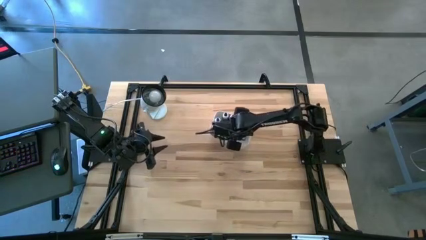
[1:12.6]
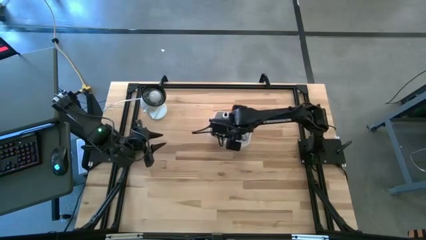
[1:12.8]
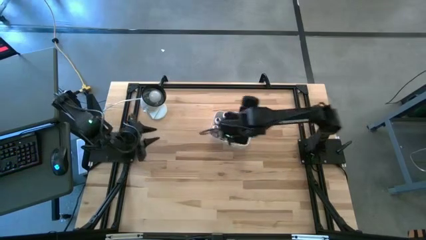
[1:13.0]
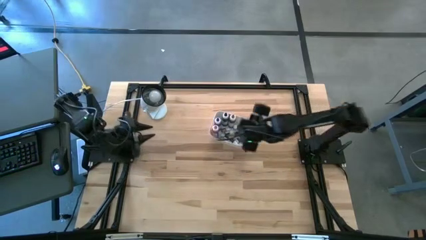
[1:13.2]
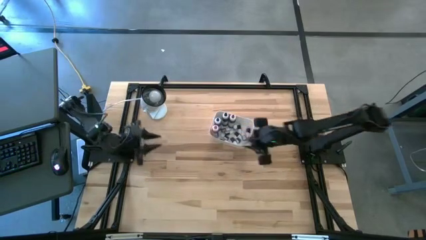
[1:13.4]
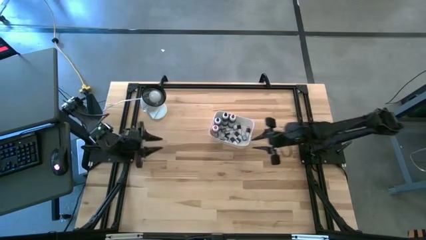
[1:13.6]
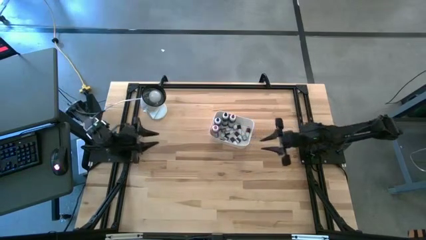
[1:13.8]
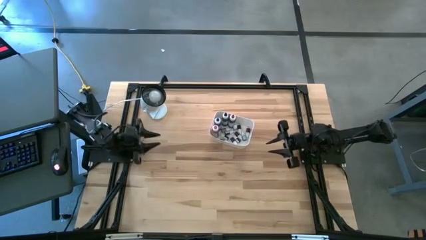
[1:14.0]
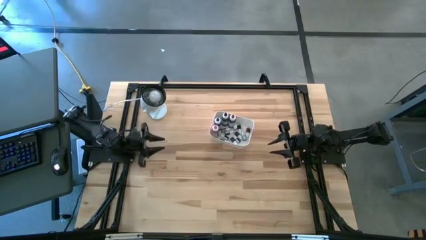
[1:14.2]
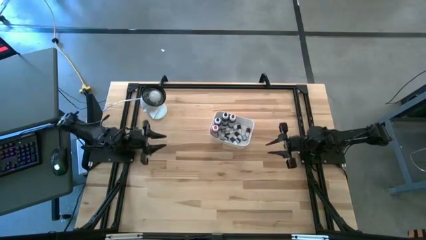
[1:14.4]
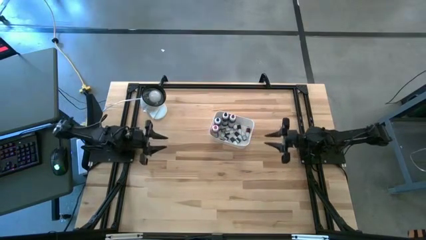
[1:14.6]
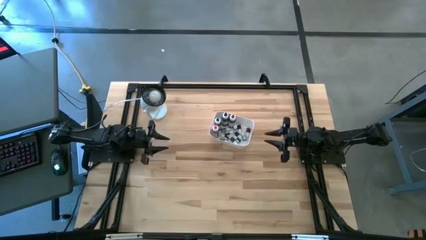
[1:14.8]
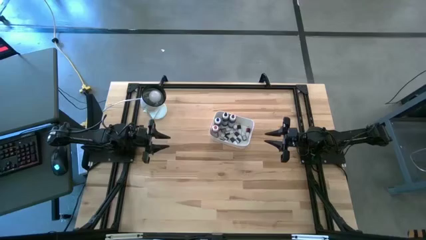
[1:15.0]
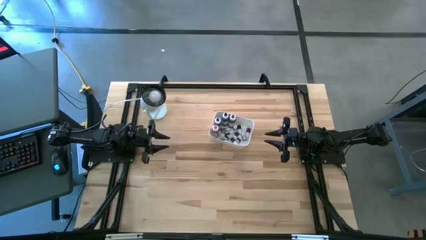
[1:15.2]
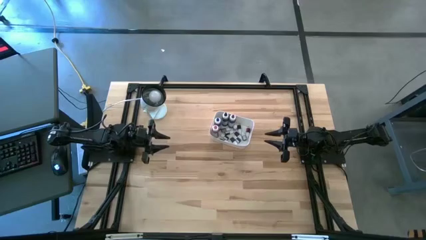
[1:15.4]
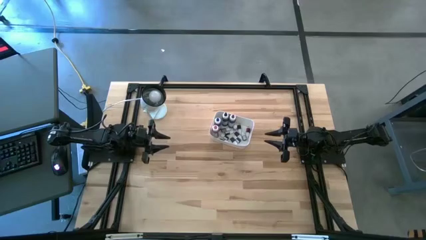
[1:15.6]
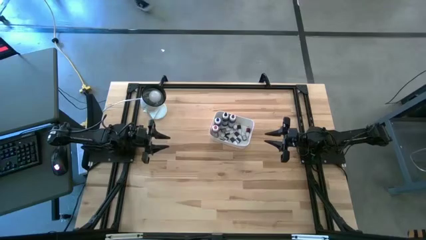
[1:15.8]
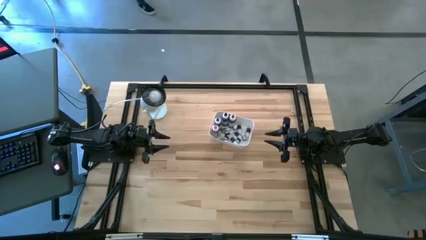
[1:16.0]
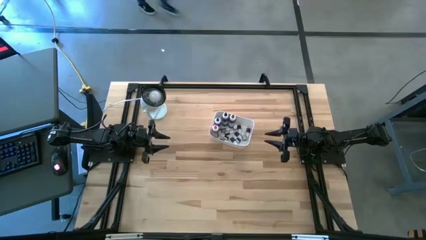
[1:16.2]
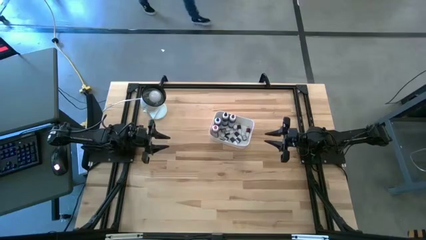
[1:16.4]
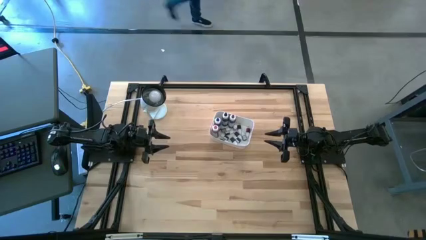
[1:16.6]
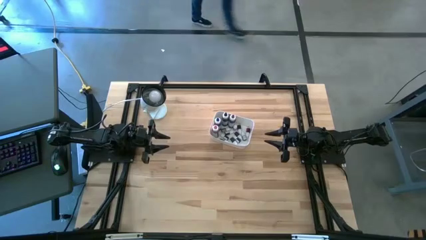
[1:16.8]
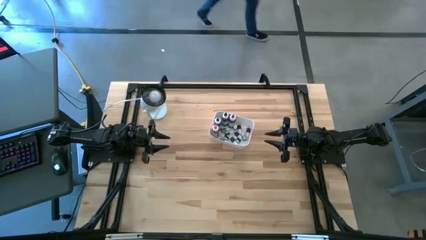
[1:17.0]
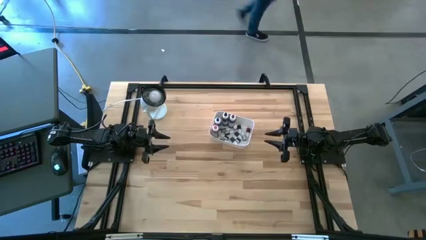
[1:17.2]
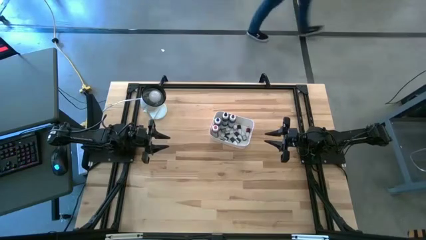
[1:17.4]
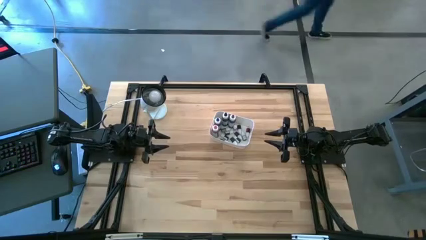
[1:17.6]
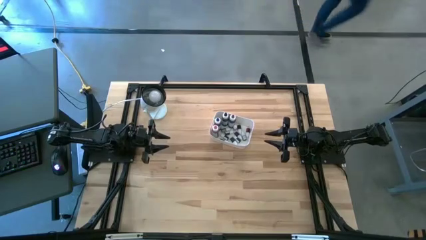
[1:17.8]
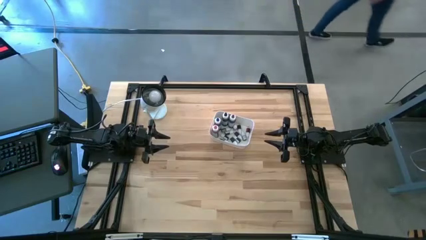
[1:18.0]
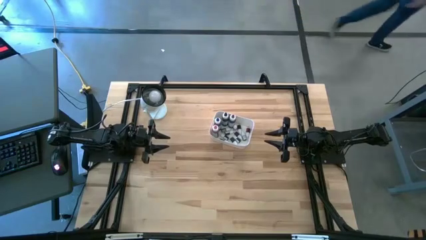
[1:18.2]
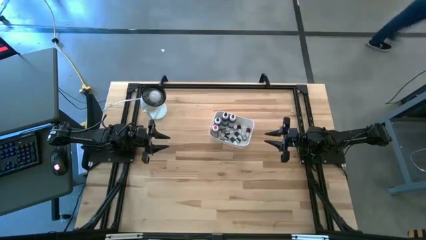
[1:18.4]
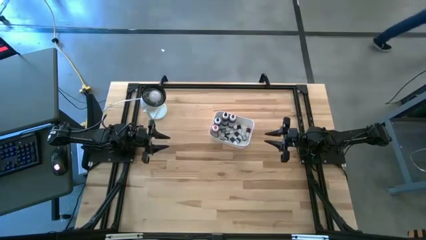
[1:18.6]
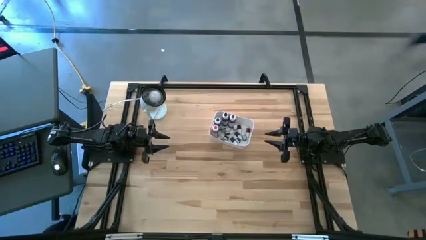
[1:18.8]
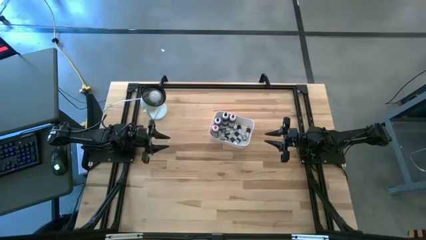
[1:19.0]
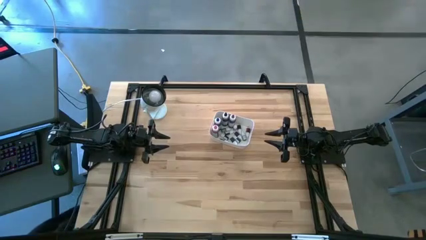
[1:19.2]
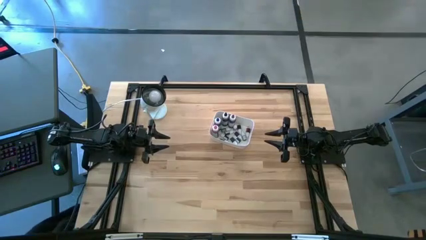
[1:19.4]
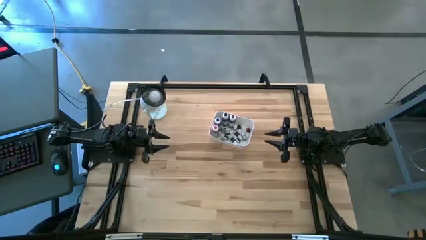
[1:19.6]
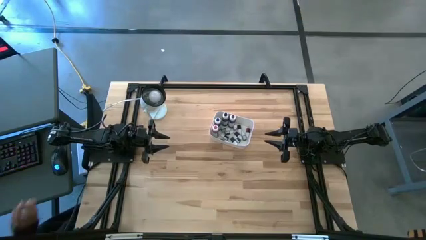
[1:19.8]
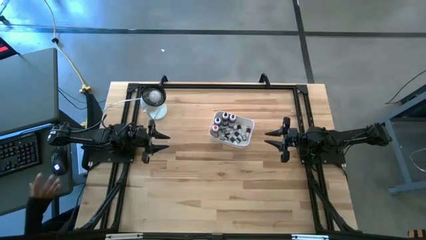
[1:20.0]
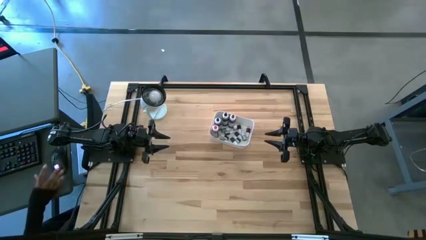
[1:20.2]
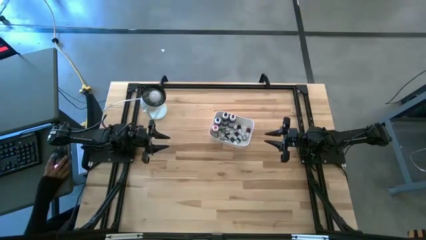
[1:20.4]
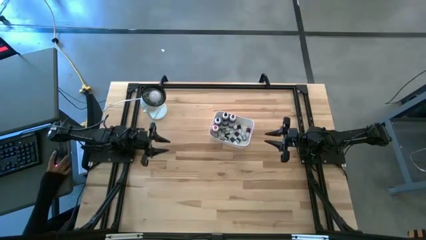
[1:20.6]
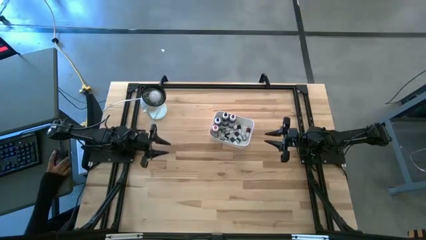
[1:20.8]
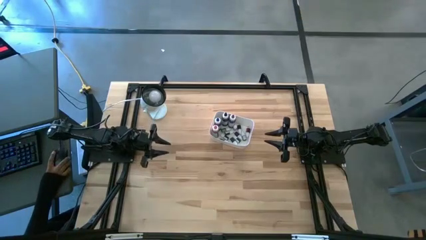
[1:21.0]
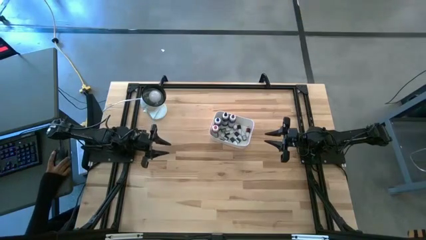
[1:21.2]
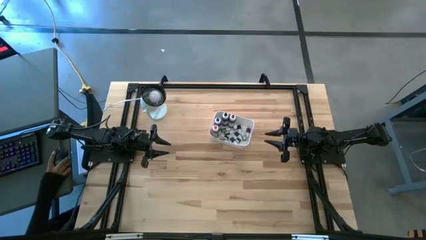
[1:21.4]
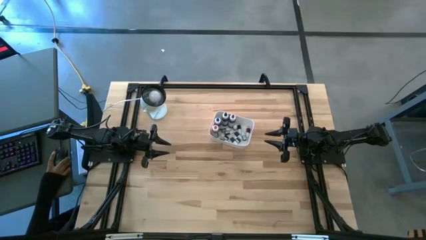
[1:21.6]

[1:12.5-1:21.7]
Task: Pick & Place food coloring
Return to Home Position

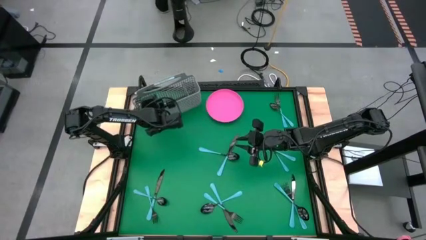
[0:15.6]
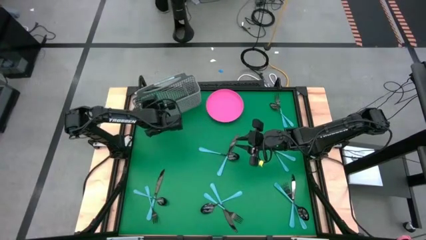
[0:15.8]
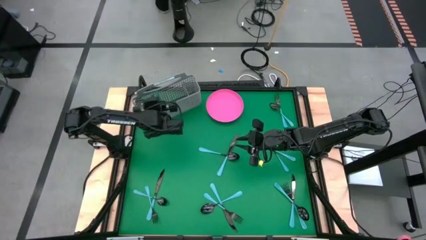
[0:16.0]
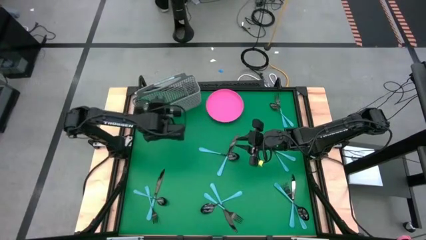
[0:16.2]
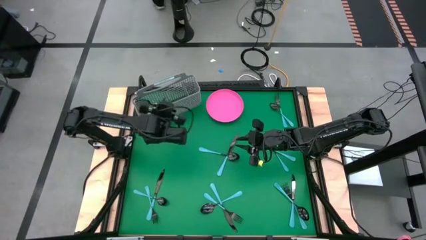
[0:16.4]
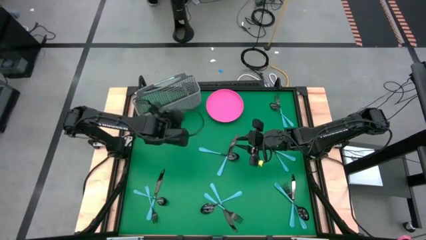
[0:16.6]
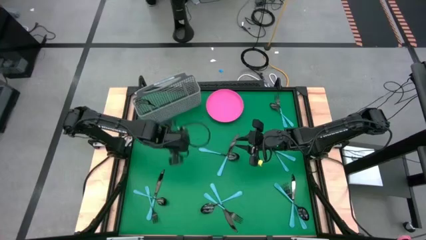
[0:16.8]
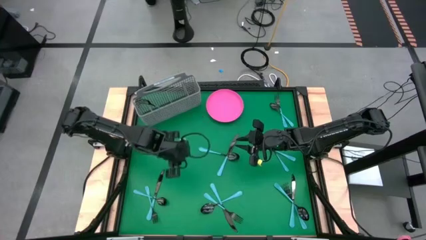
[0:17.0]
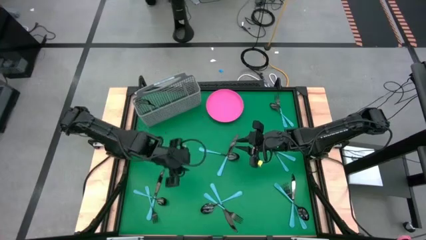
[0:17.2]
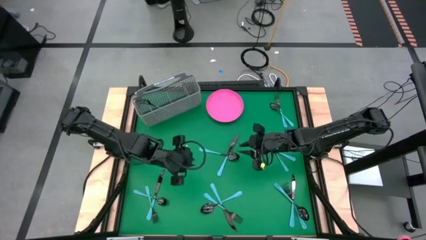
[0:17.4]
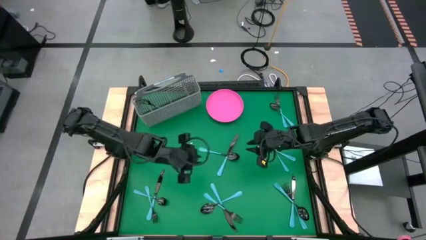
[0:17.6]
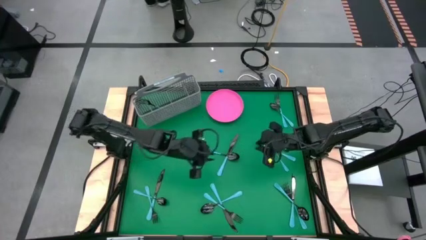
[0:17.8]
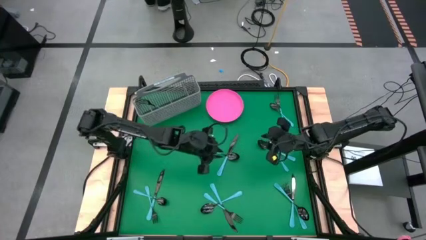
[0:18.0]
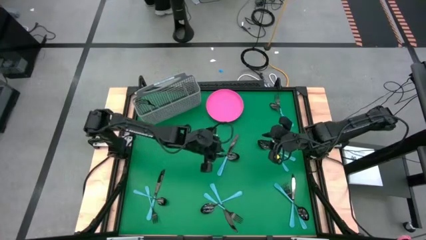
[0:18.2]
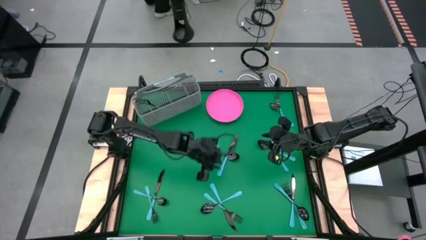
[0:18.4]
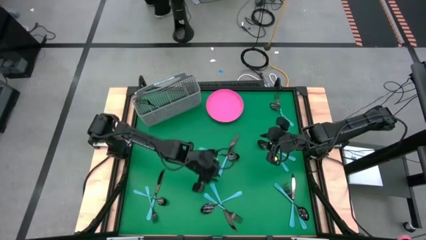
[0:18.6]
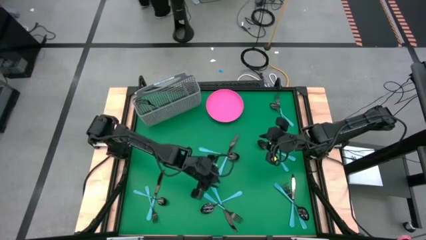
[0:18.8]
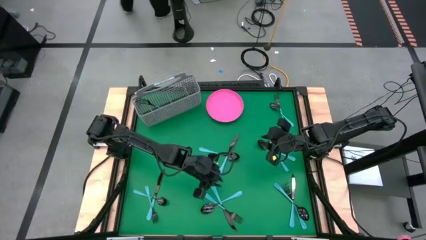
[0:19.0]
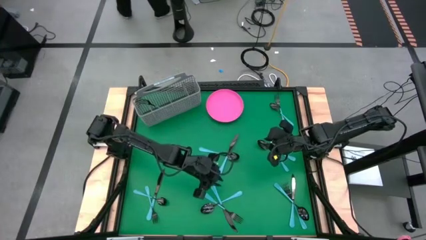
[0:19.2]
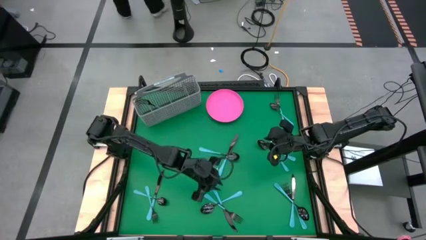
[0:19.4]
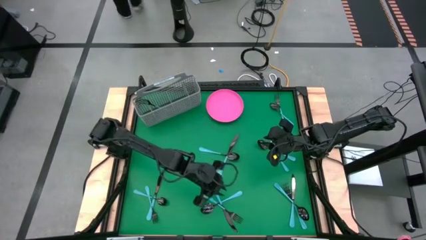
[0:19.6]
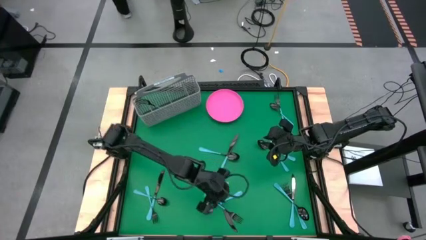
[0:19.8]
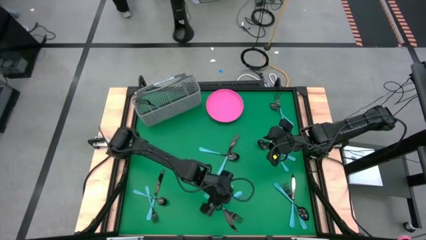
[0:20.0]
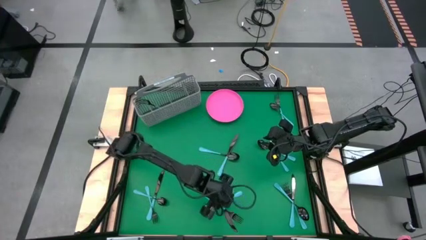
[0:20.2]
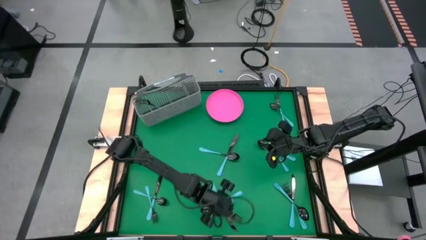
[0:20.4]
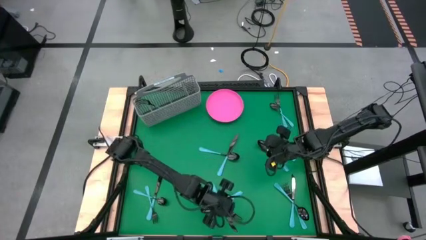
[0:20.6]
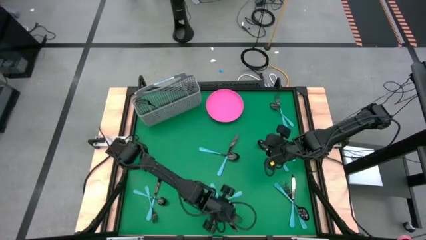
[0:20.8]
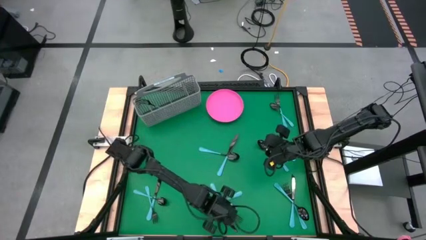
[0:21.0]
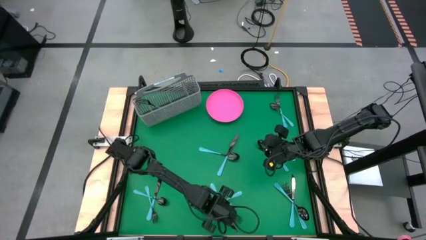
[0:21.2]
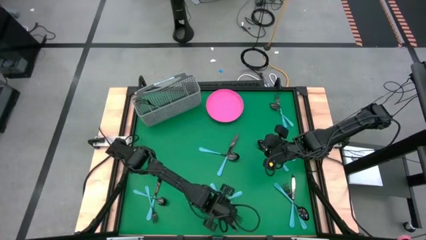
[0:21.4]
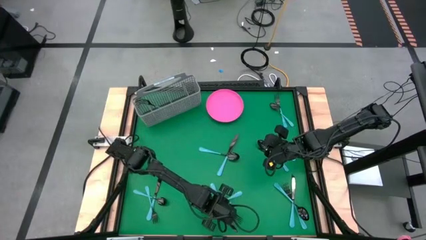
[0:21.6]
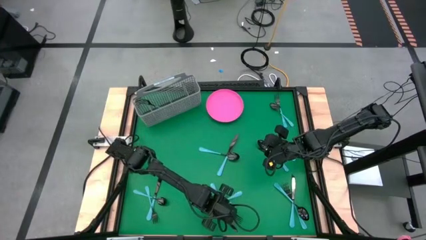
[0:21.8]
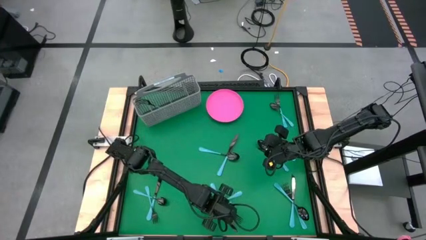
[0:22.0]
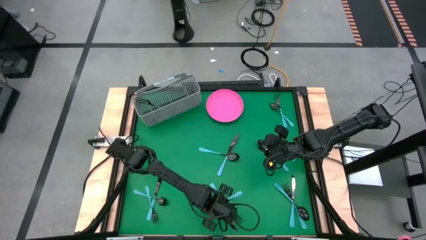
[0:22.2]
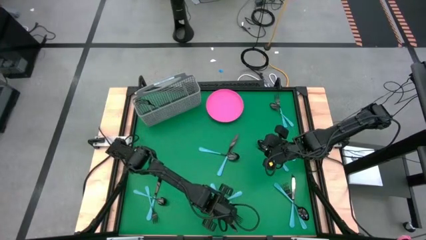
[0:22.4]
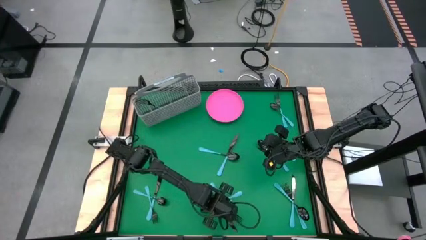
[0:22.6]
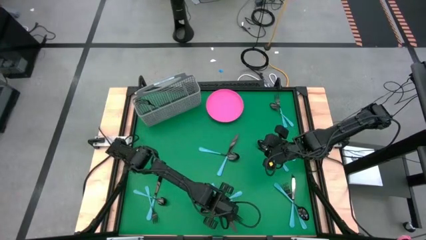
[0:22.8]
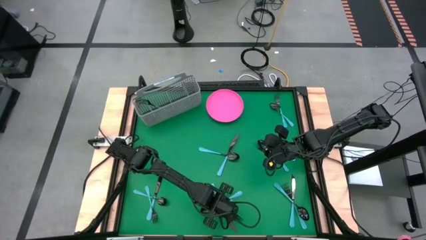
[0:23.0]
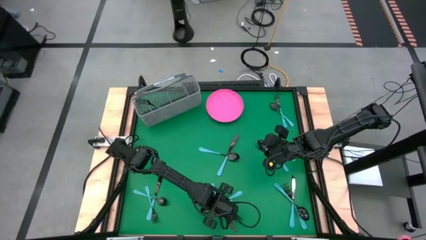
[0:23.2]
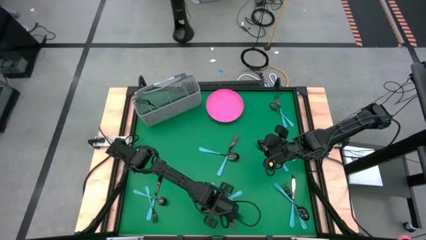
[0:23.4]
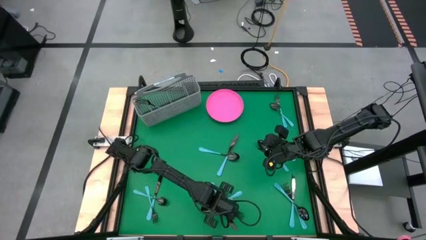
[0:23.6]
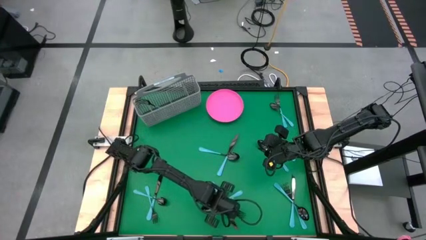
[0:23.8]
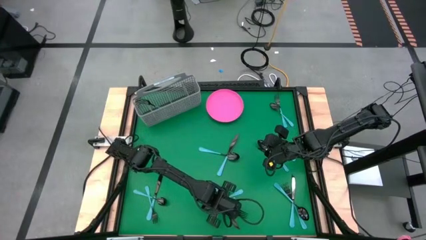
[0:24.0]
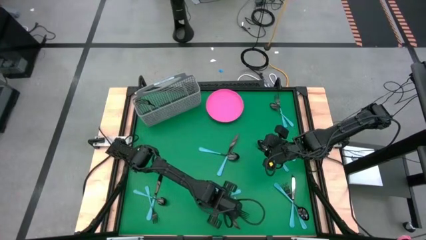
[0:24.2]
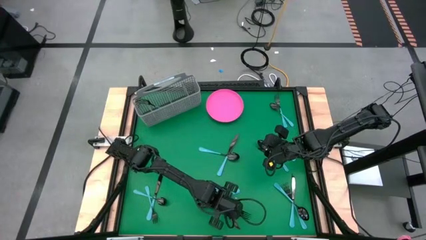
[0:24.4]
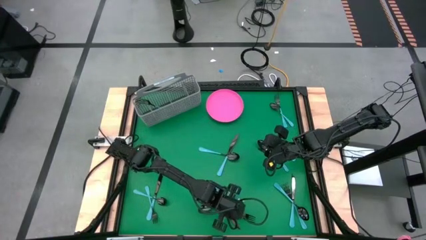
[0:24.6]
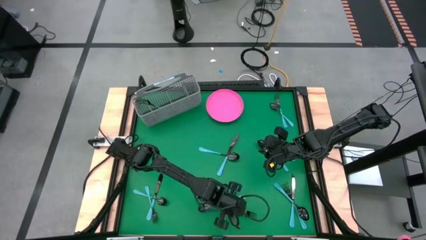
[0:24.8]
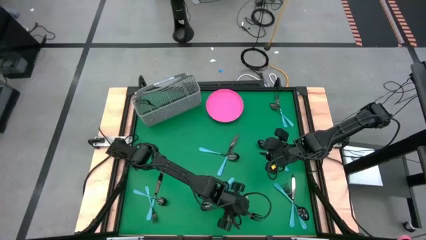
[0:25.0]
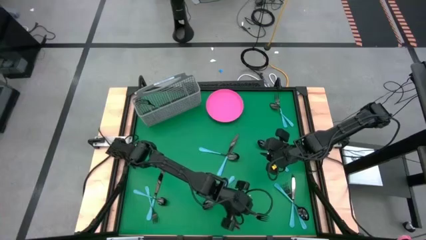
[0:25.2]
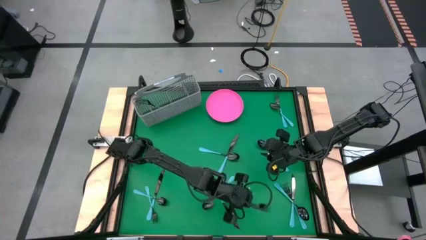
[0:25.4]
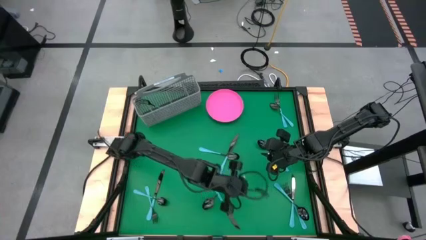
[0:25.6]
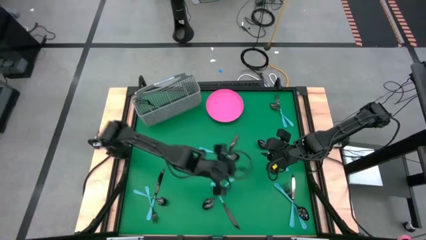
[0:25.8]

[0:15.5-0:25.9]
Task: Sort silverware
Put the blue fork into the gray silverware holder
